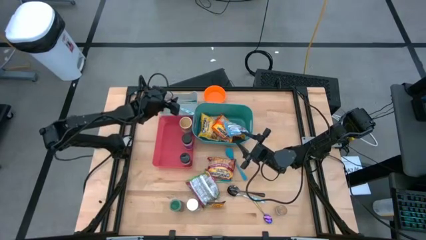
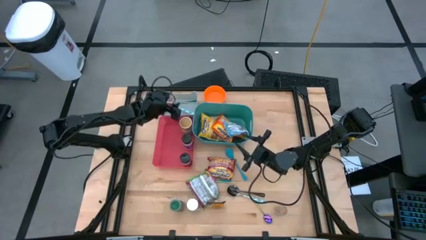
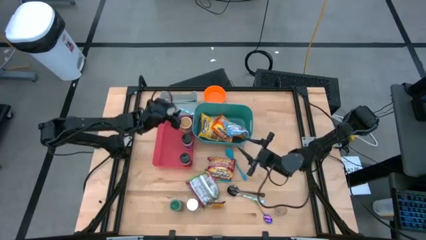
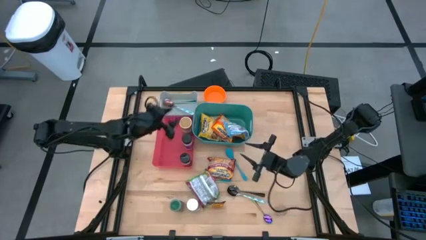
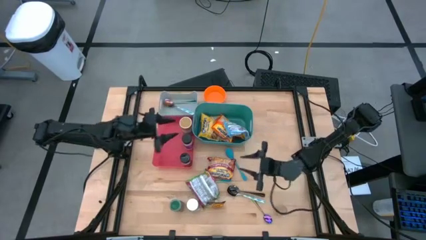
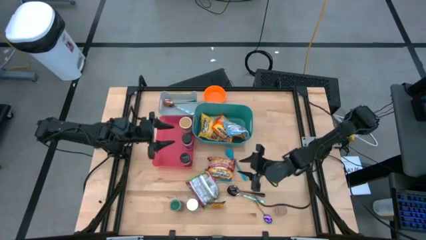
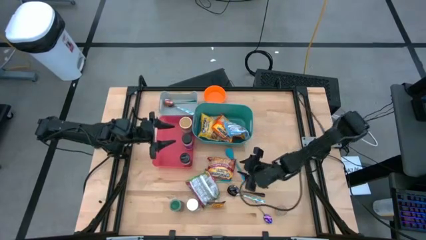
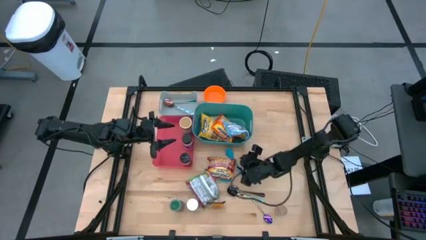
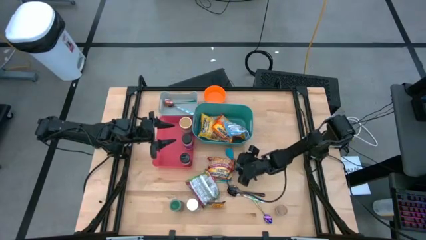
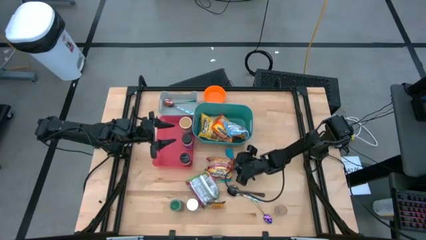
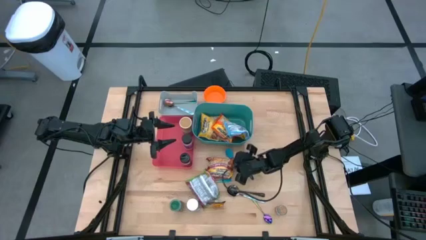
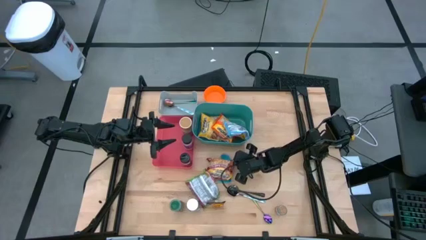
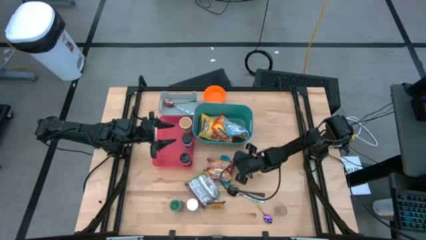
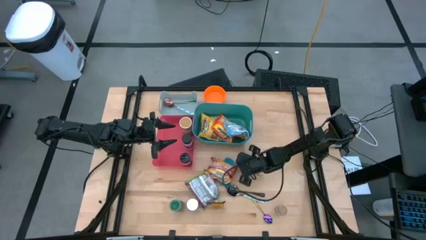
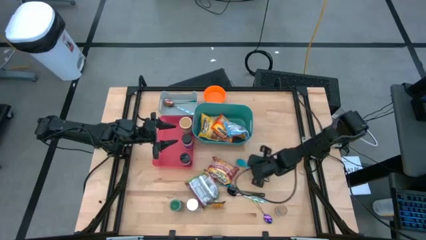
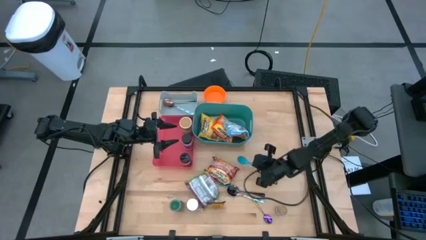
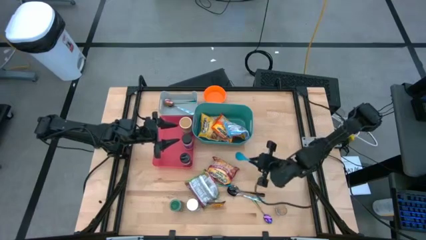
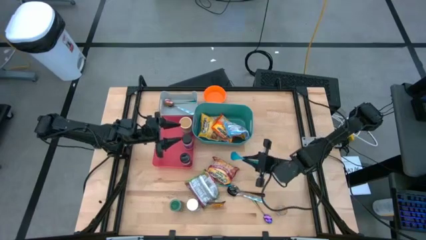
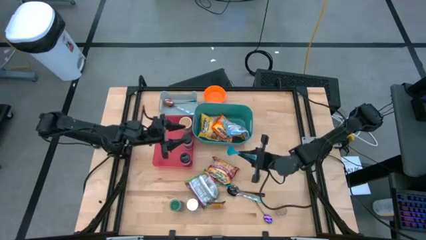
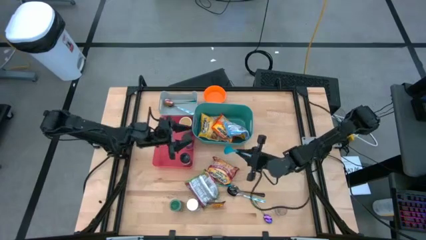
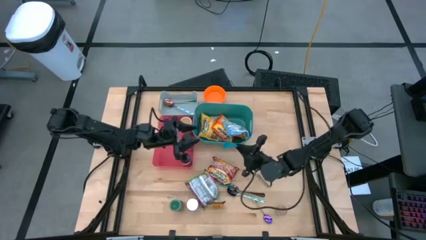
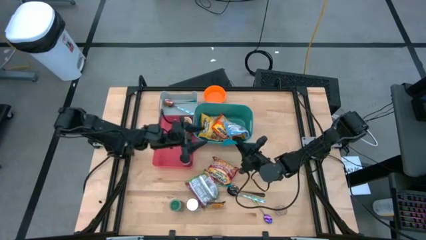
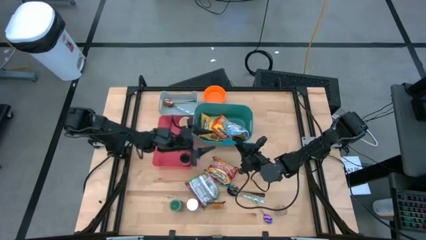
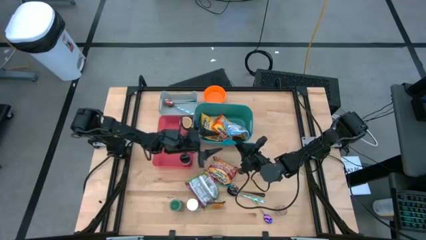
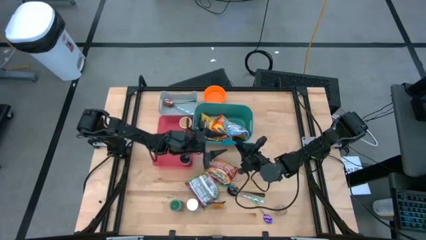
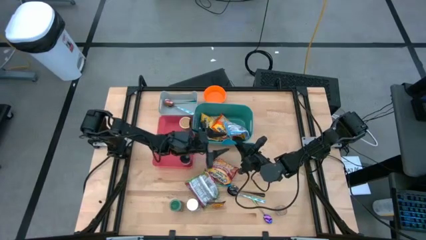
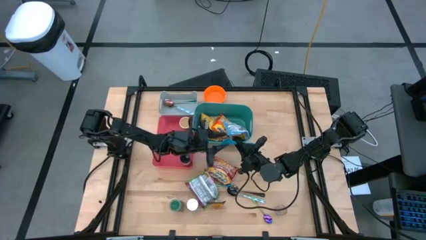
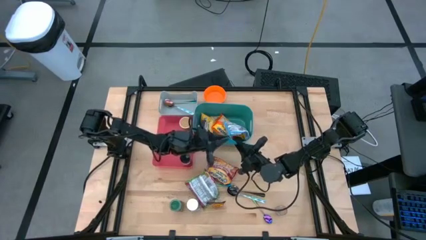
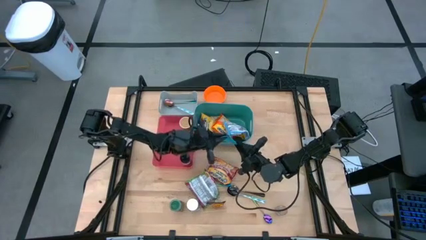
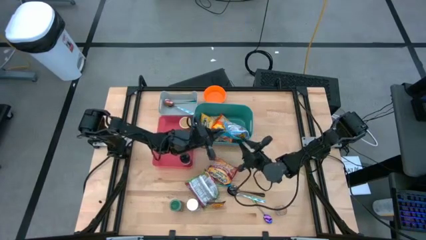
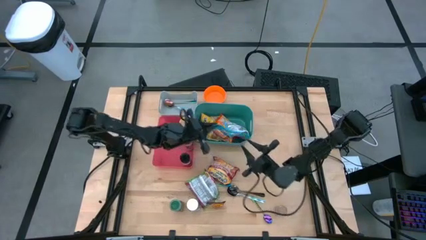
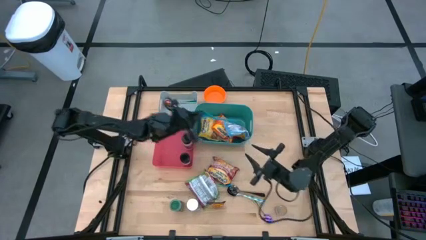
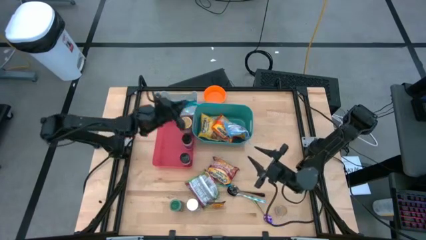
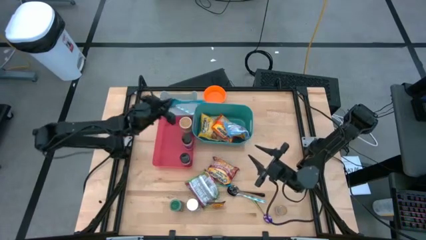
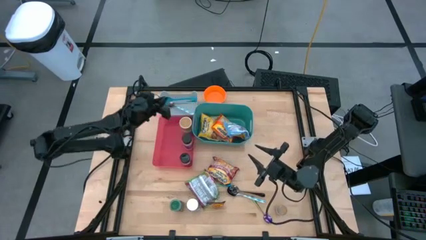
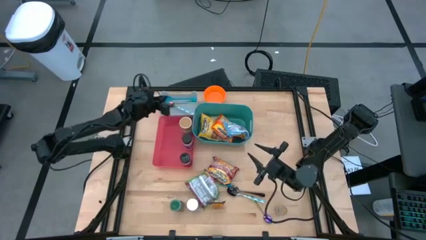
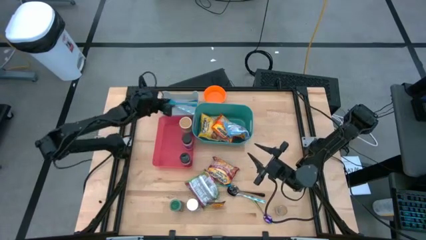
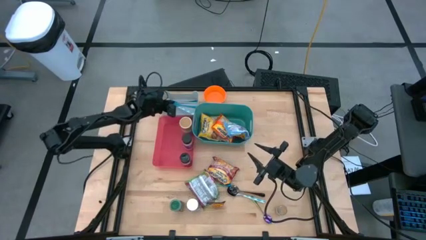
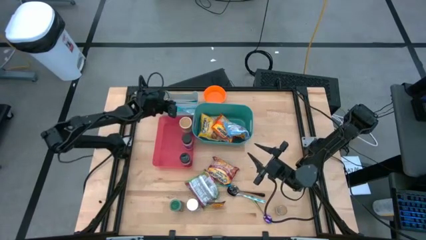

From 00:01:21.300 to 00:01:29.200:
Task: Pick & Place Food Item
Put the blue baby spoon into the gray bin

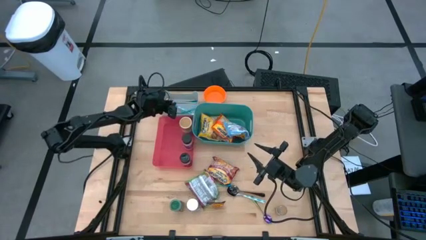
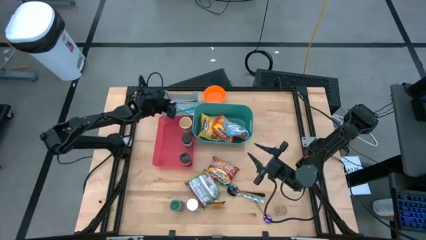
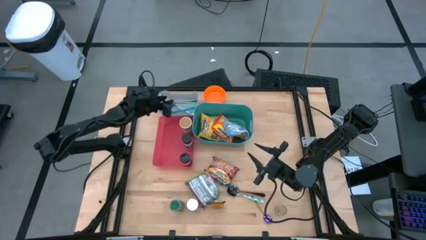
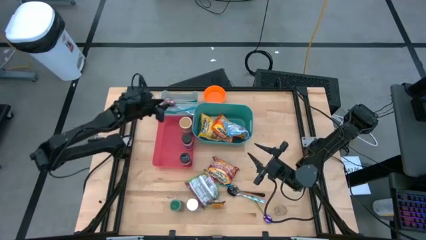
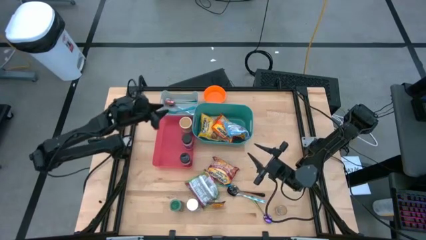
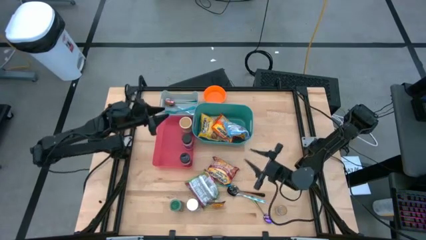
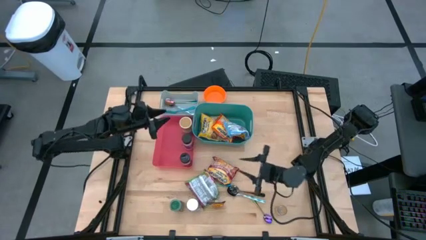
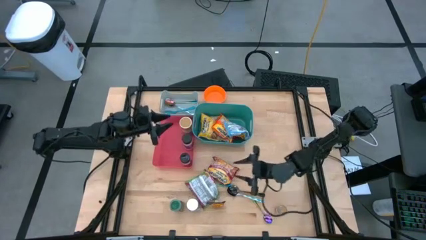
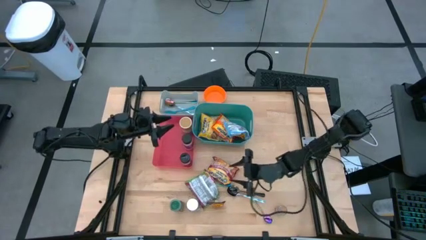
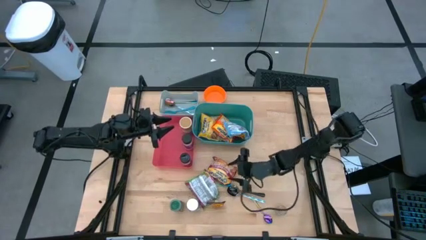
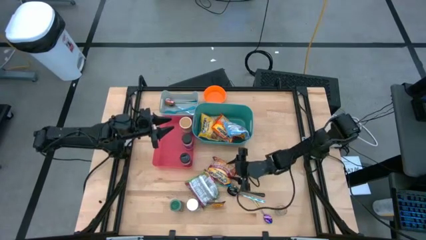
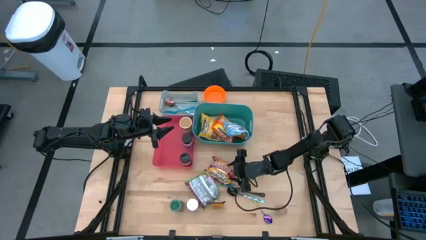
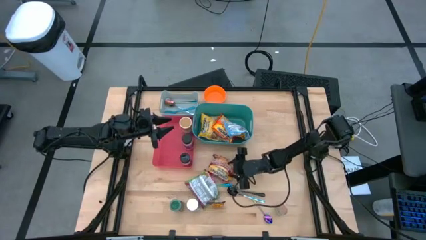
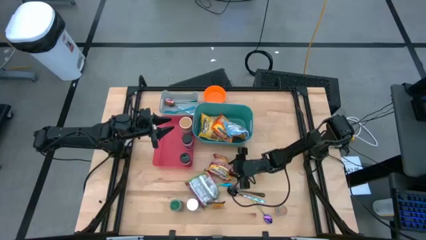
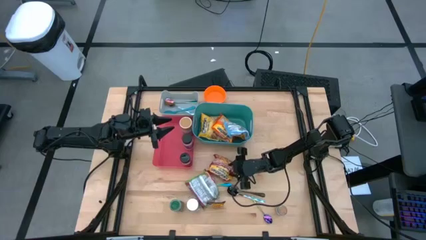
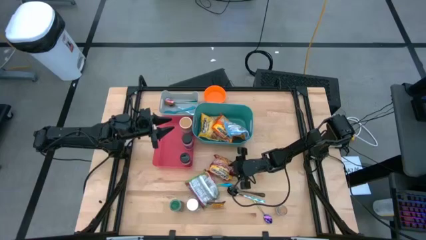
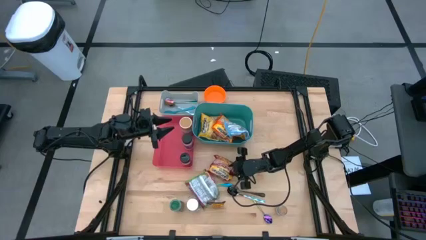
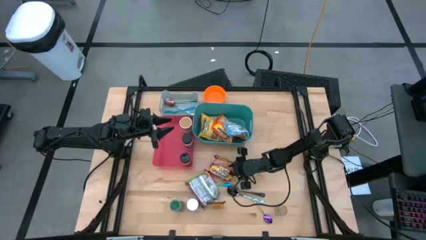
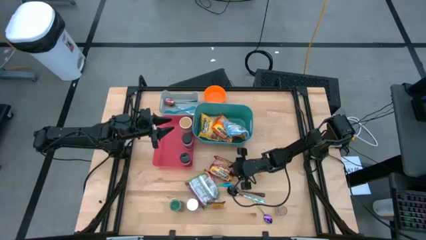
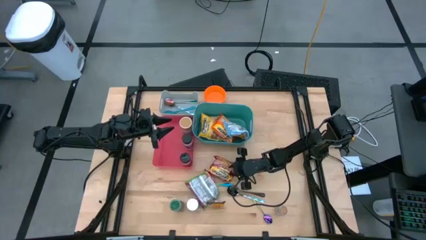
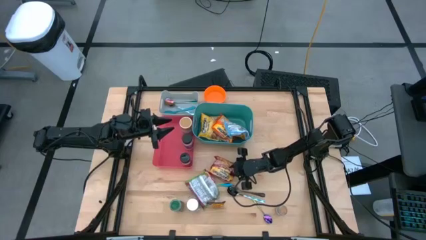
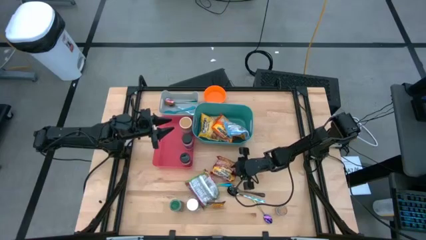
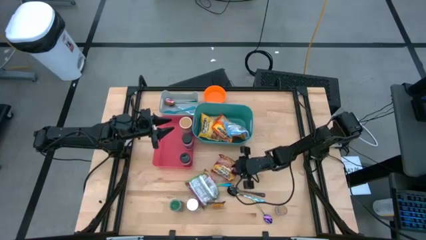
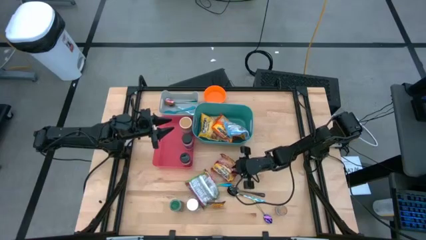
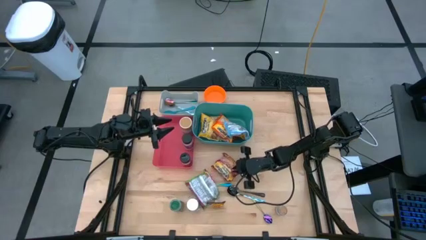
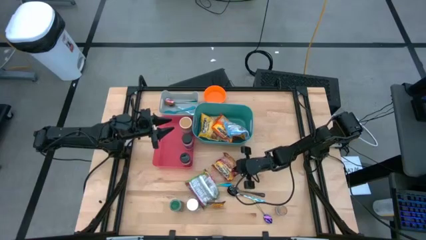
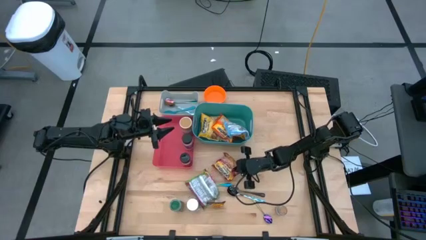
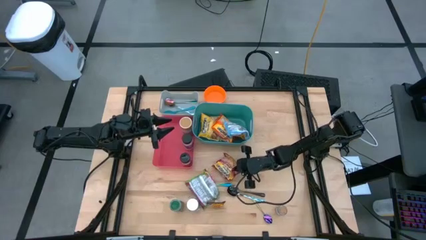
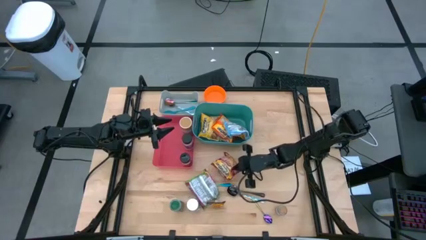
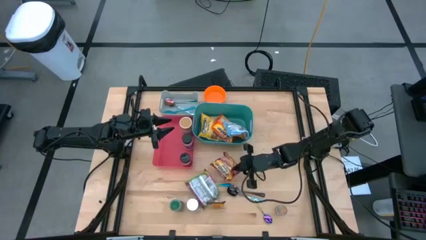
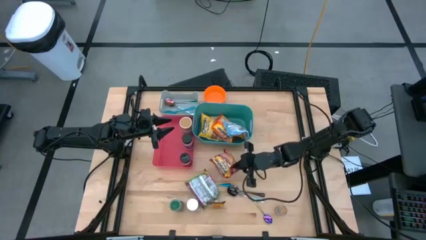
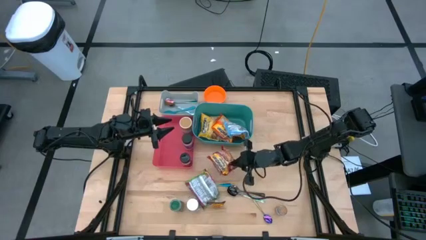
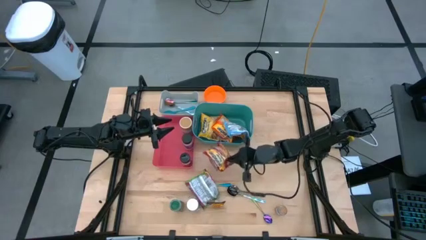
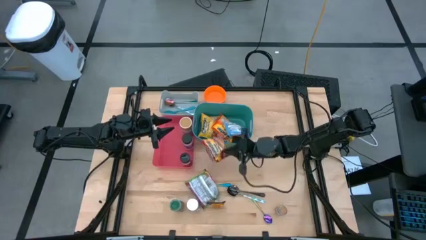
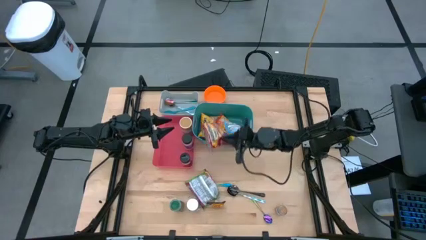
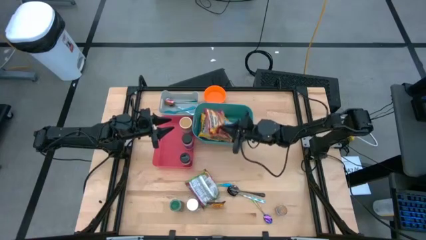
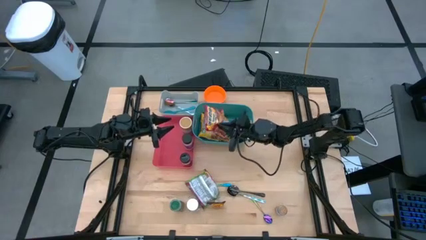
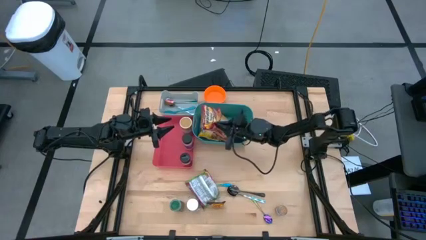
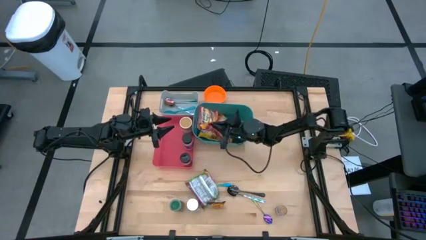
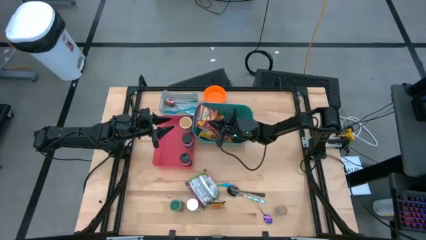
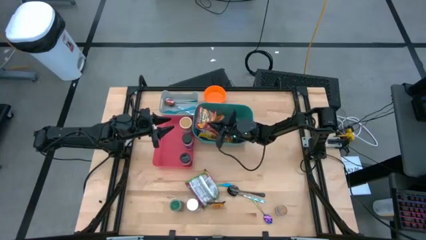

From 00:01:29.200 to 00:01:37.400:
Put the red noodle pack into the green bin

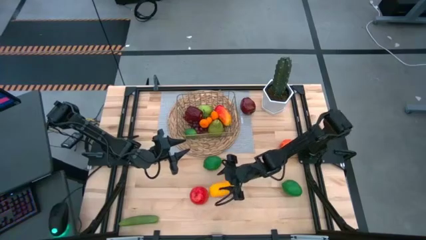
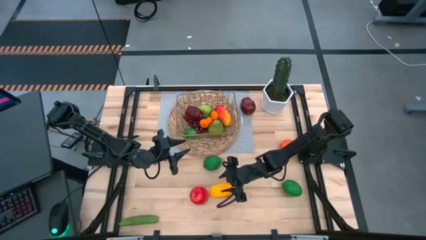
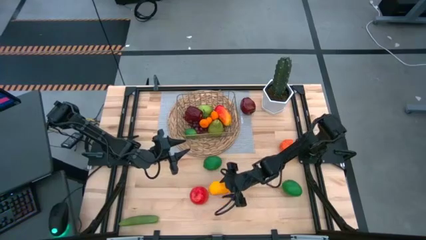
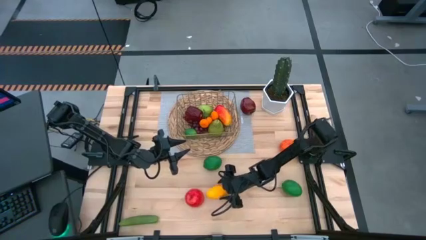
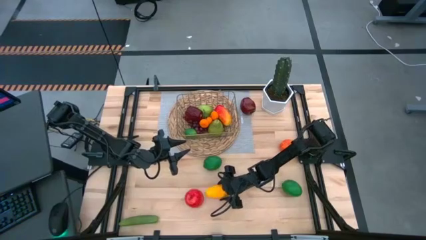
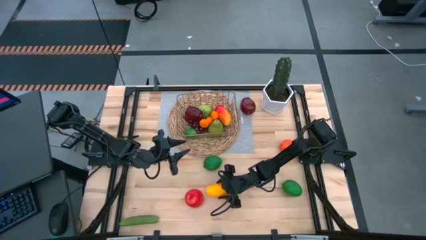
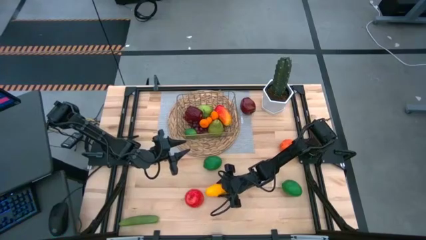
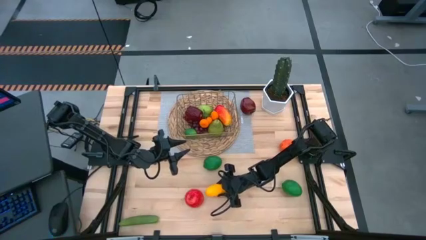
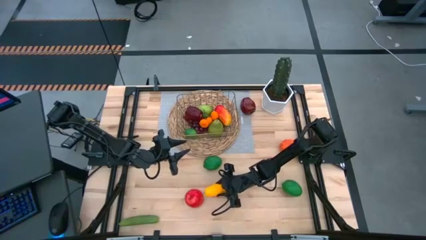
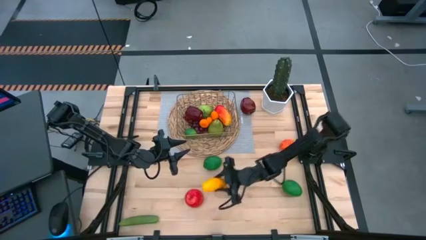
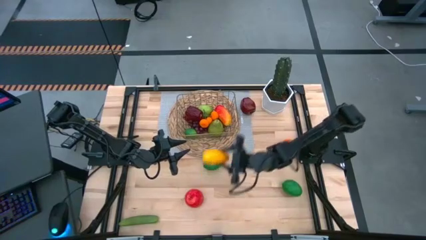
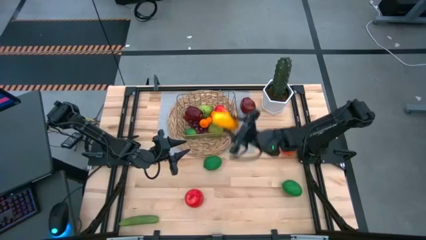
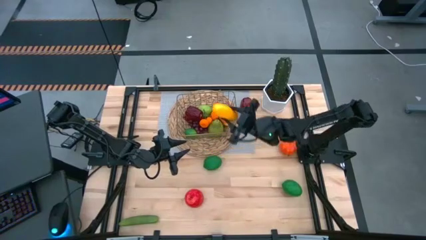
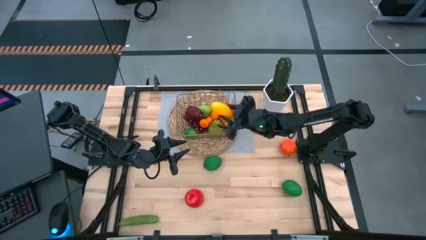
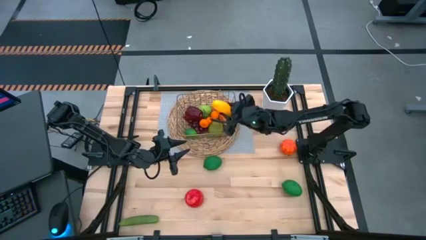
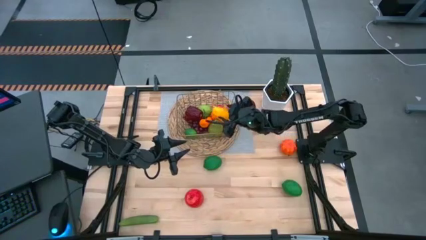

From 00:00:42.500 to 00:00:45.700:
Task: Build produce basket
Put the yellow mango into the gold wire basket
